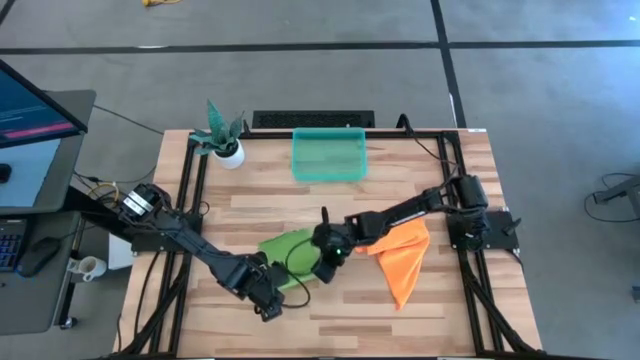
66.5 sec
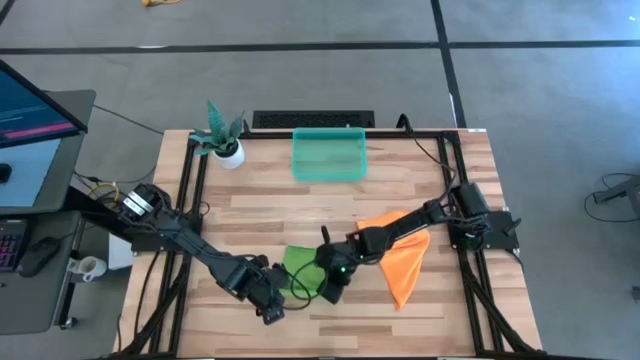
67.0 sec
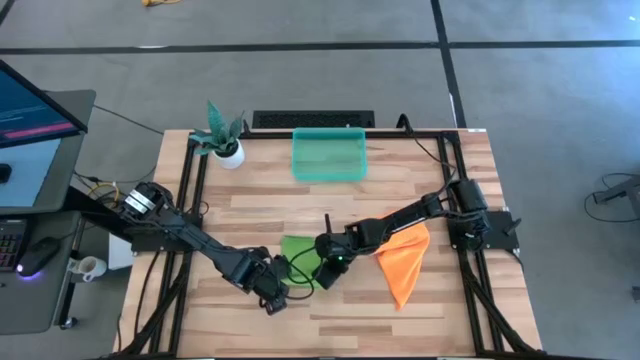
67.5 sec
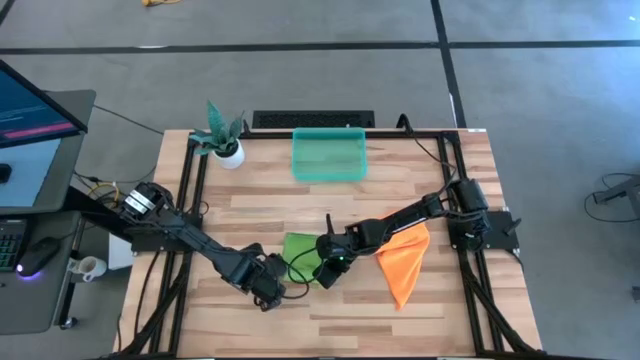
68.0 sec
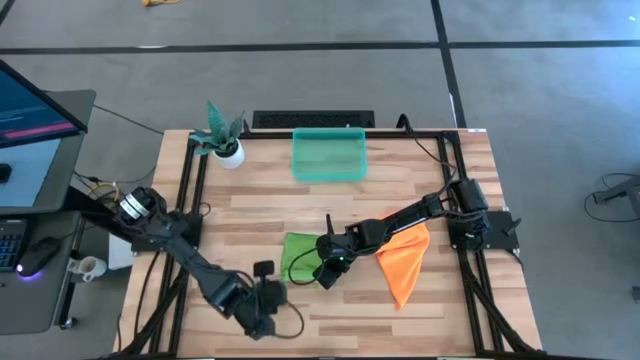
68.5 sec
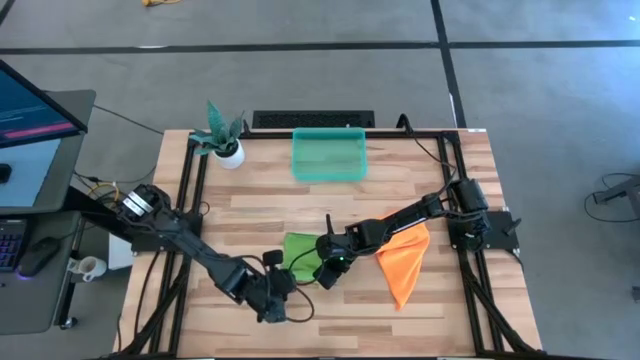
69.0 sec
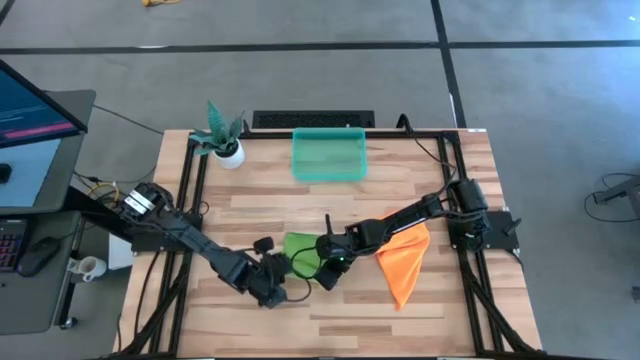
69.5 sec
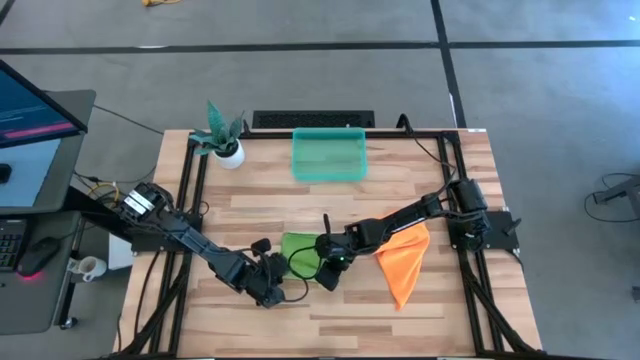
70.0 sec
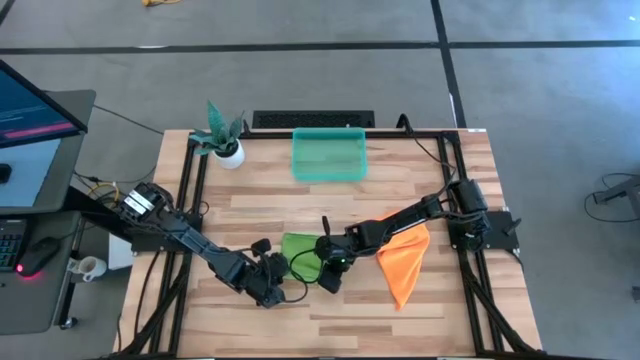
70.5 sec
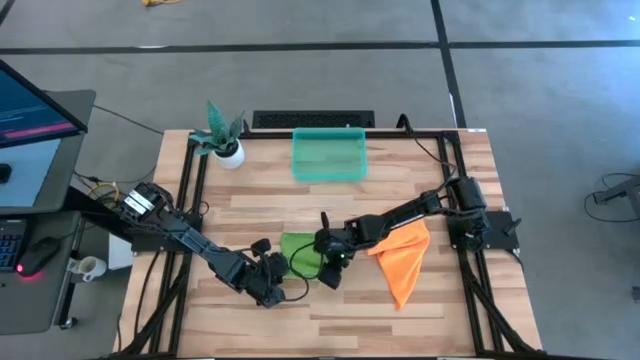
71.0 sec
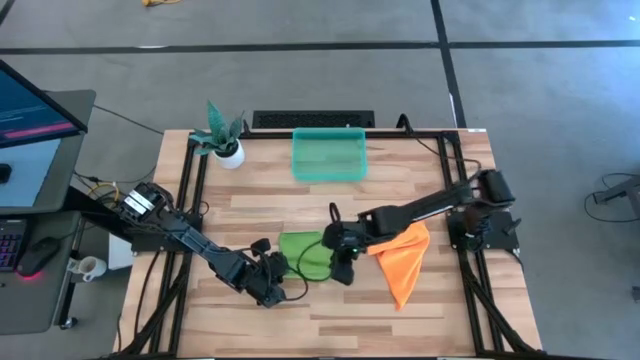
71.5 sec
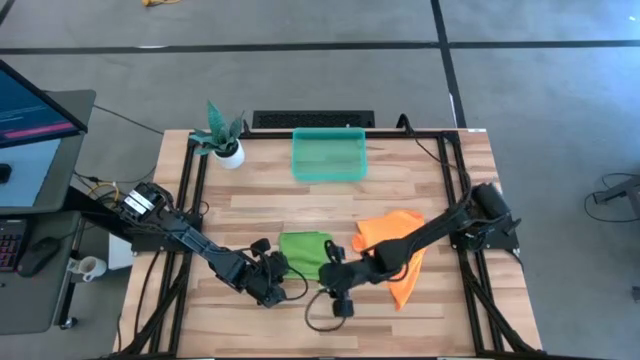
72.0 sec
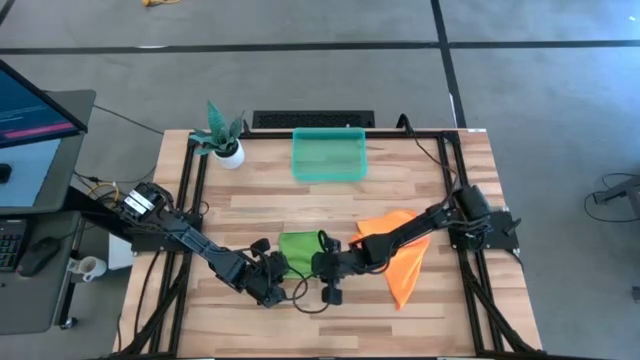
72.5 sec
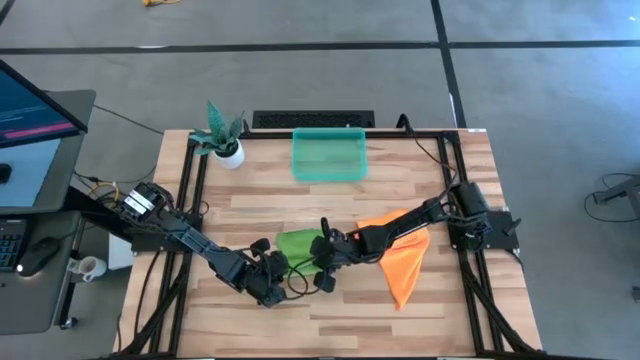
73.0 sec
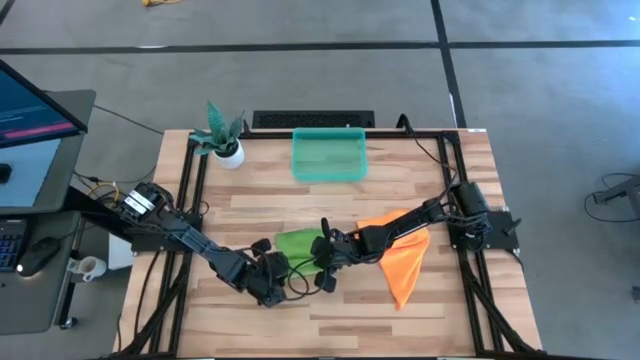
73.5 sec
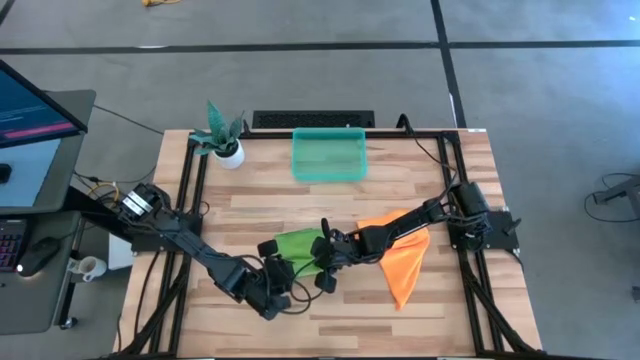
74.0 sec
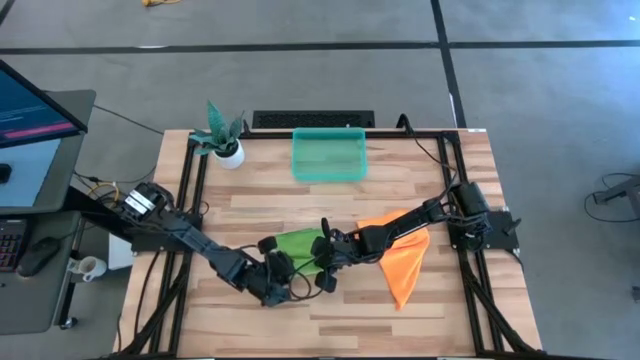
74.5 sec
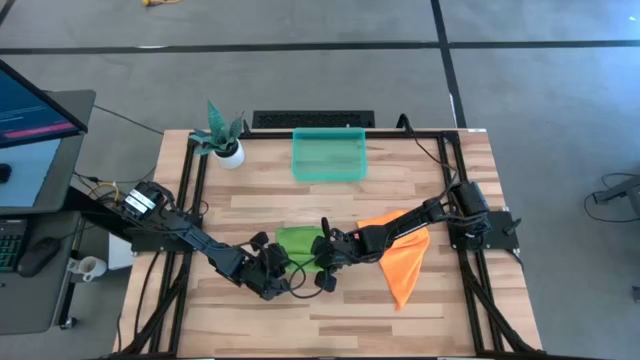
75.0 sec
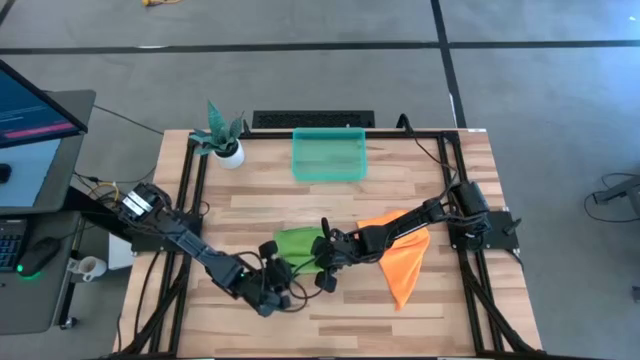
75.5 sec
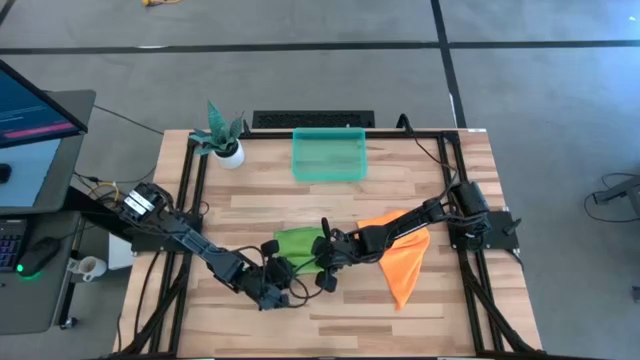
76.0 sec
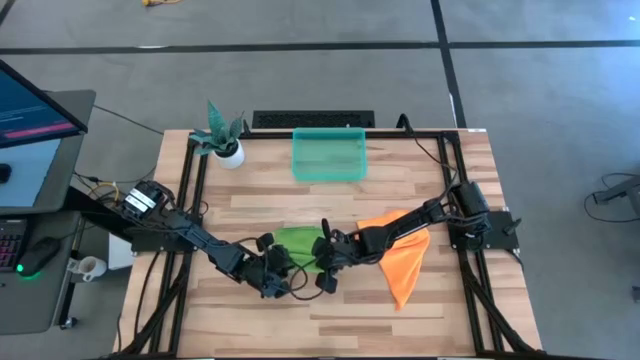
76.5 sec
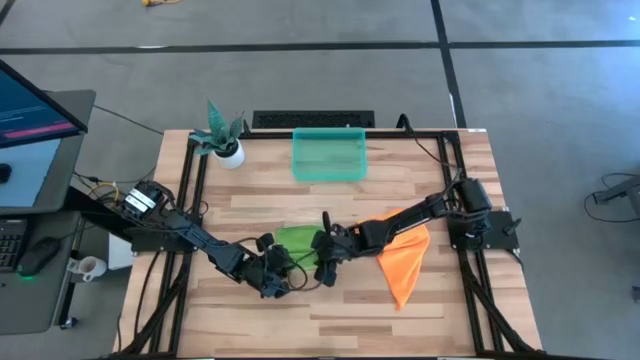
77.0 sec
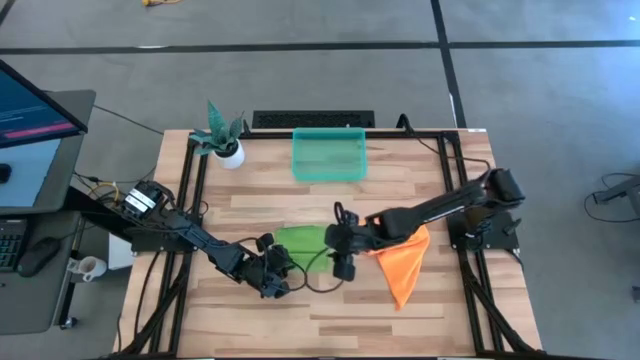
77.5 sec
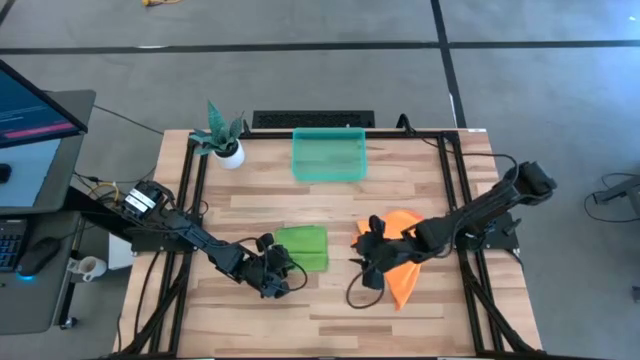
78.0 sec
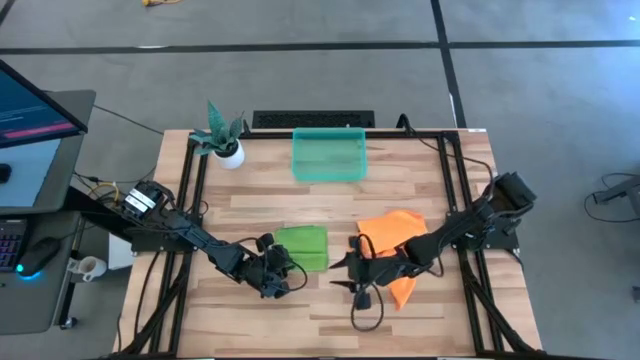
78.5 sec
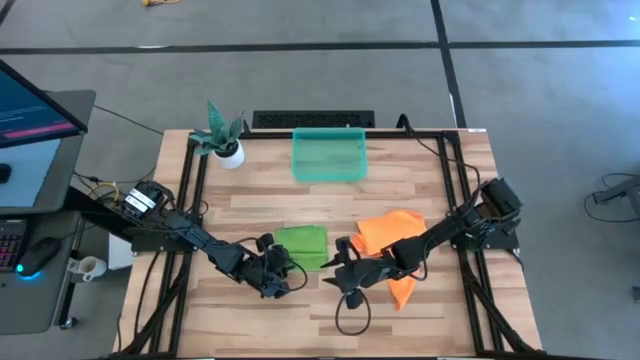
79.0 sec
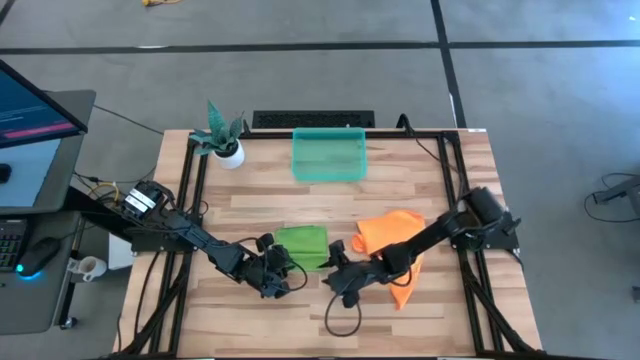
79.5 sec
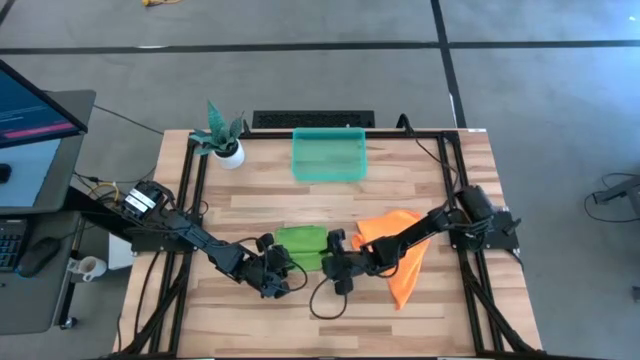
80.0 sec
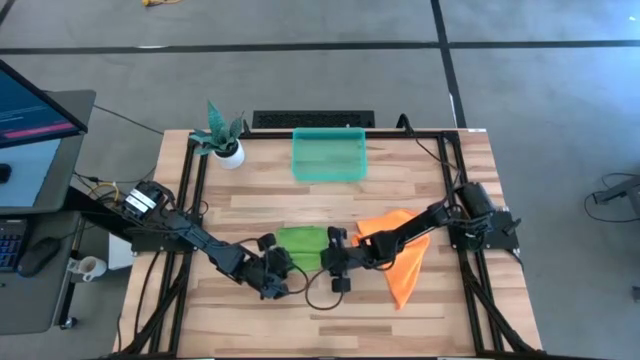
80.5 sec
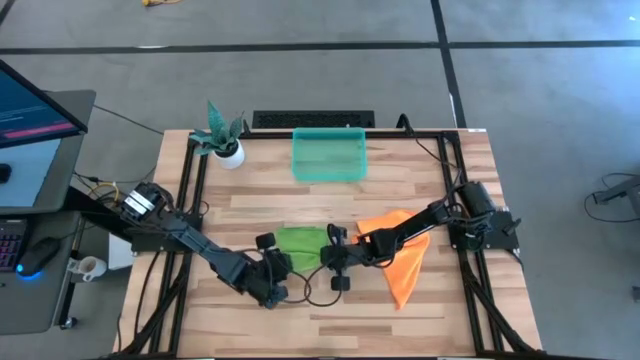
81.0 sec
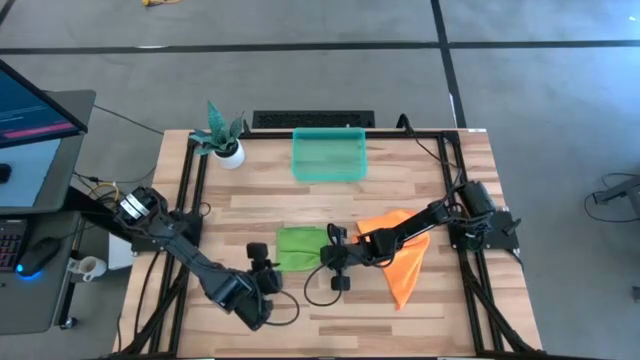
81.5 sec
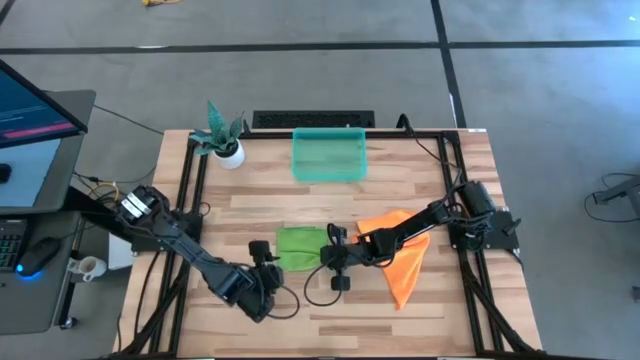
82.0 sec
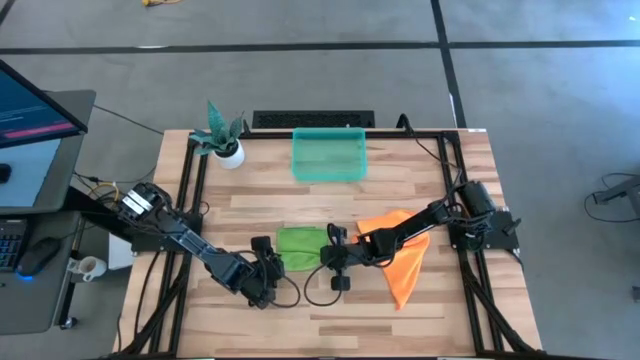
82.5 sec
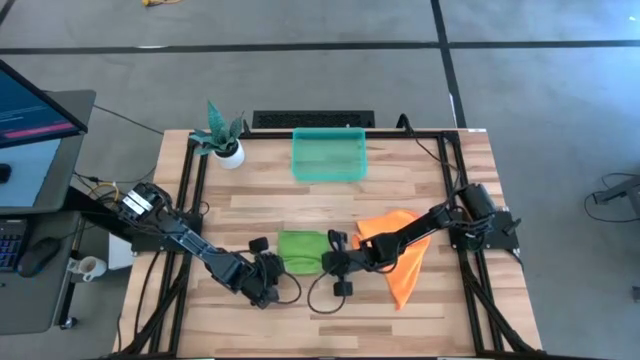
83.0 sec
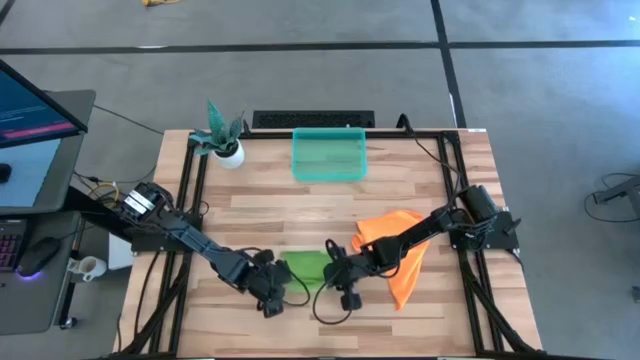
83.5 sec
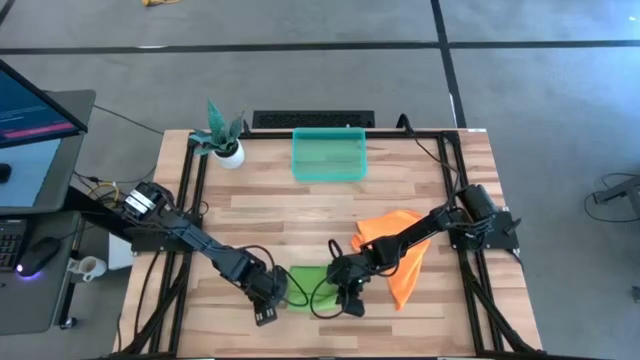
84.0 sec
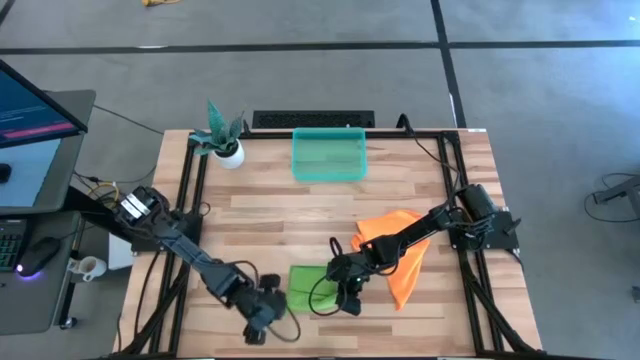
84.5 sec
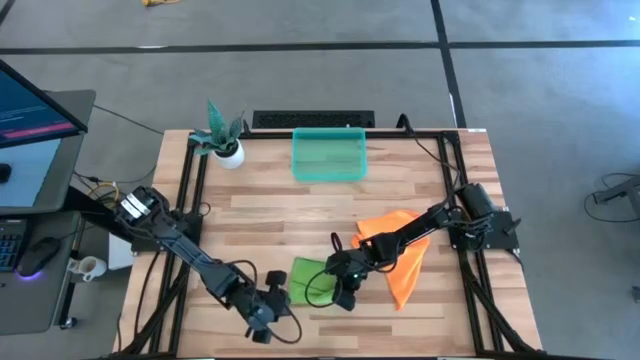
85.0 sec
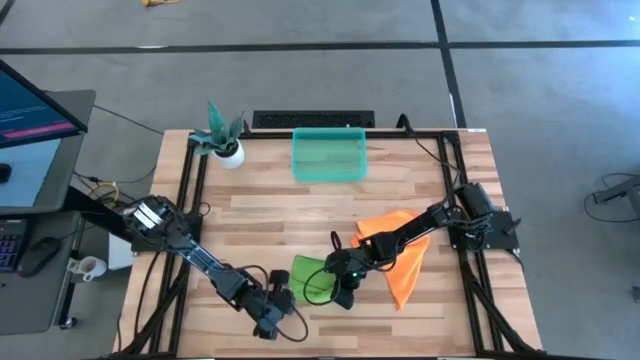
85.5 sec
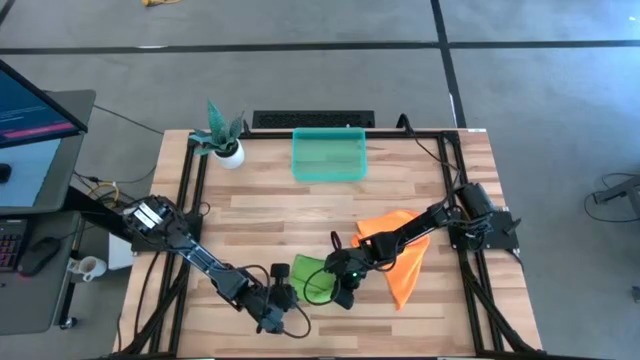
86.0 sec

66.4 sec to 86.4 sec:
Task: Roll towel into tight, uniform cylinder
Roll the green microfiber towel

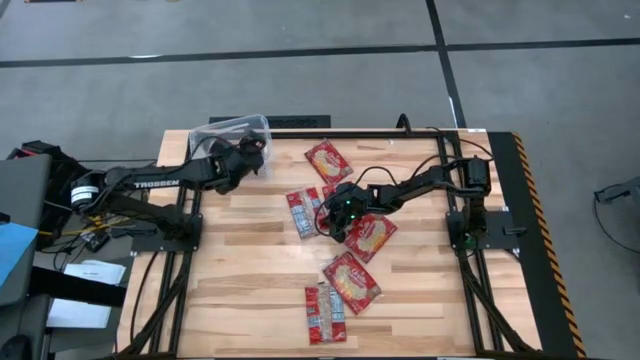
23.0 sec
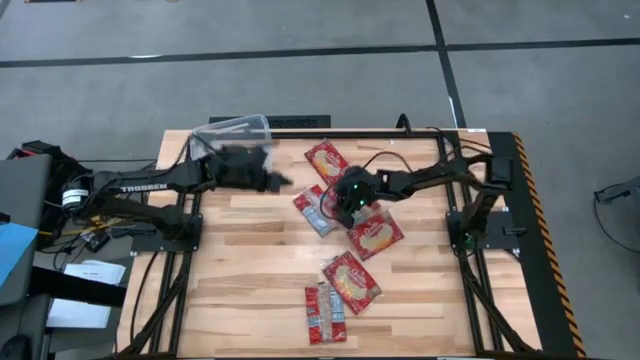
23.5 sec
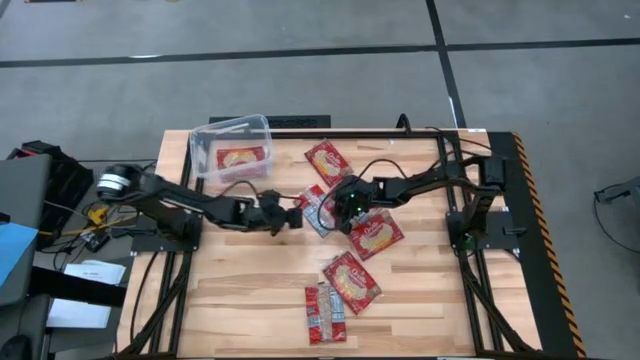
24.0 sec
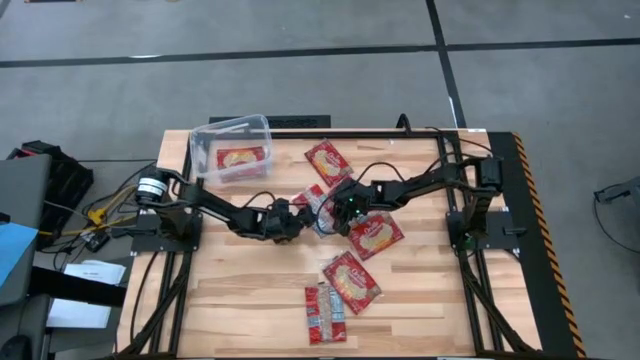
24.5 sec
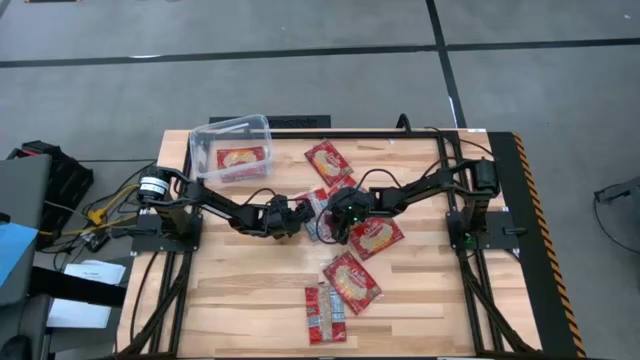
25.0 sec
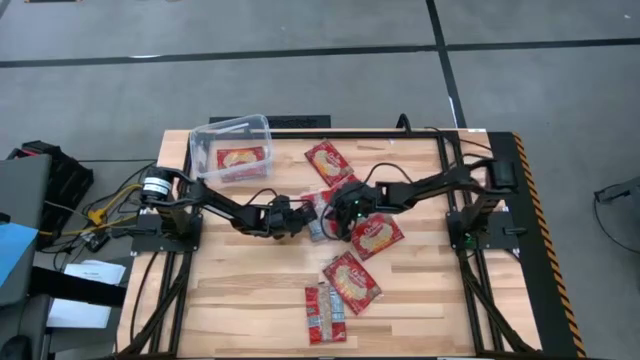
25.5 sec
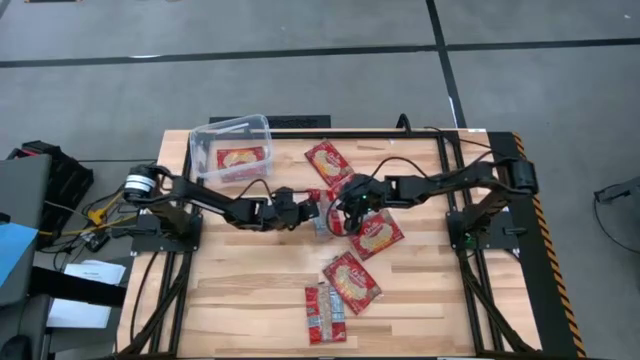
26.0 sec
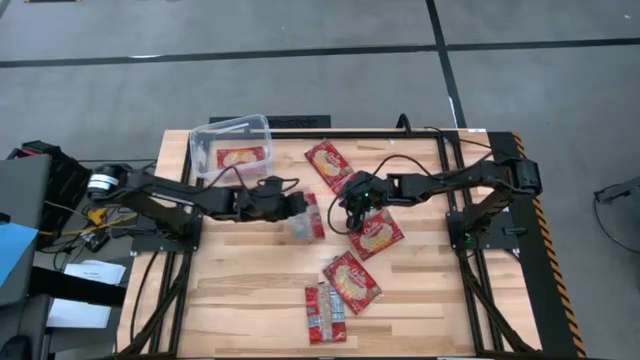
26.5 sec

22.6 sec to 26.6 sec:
Task: Sort popcorn bags into baskets
Put the red popcorn bag into the transparent bin
